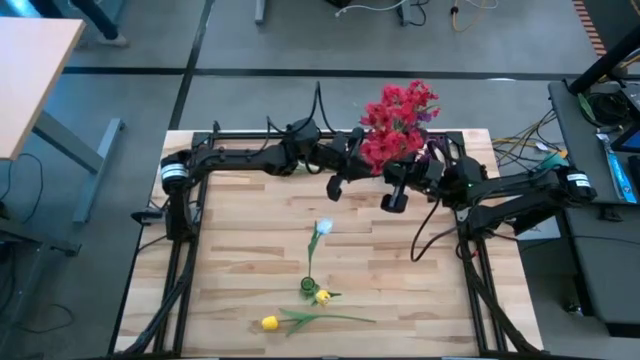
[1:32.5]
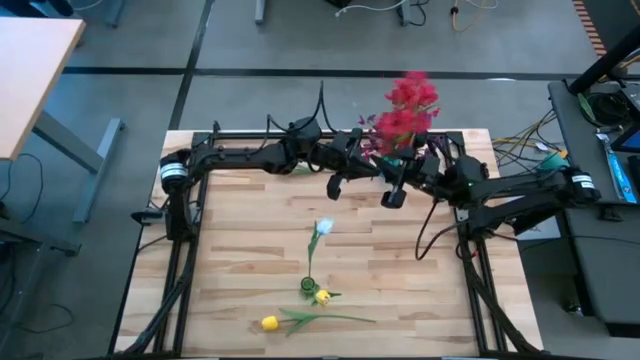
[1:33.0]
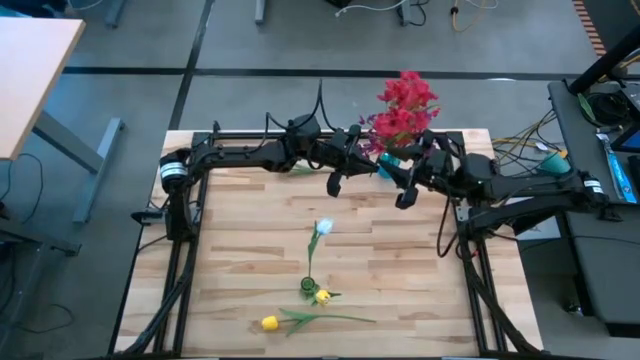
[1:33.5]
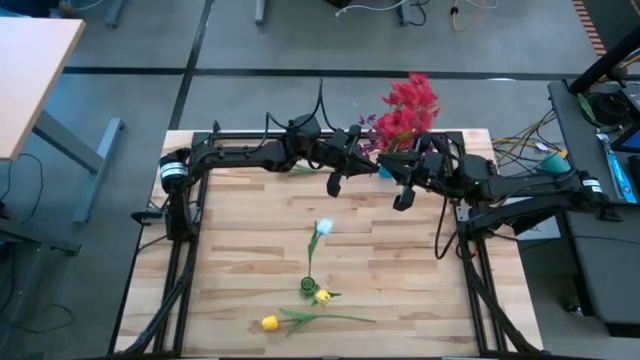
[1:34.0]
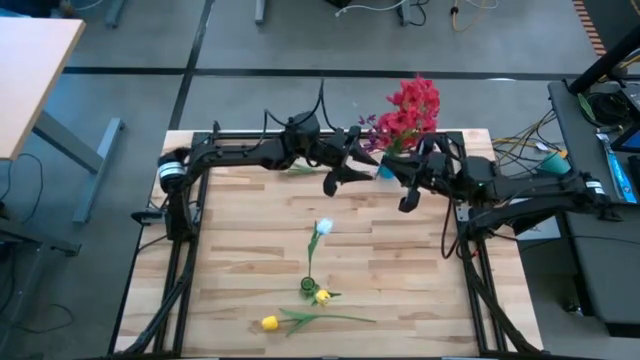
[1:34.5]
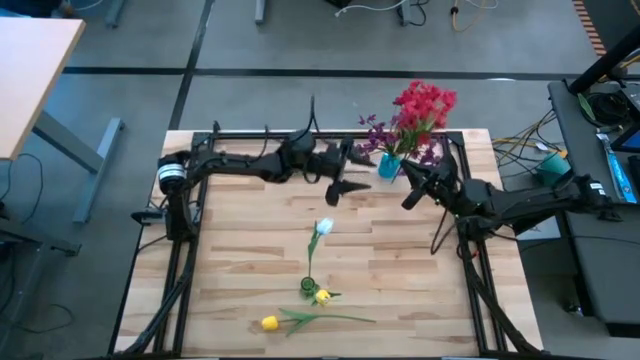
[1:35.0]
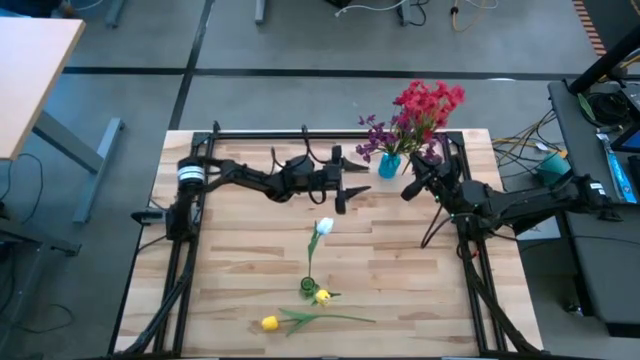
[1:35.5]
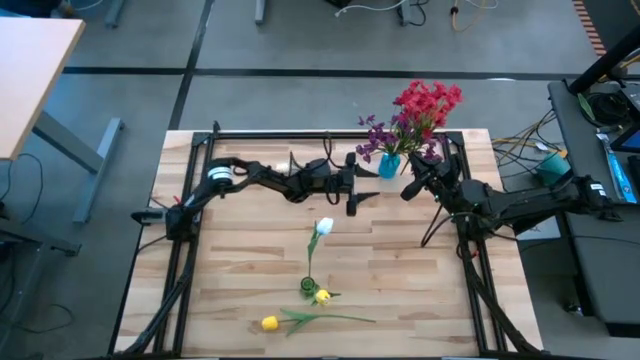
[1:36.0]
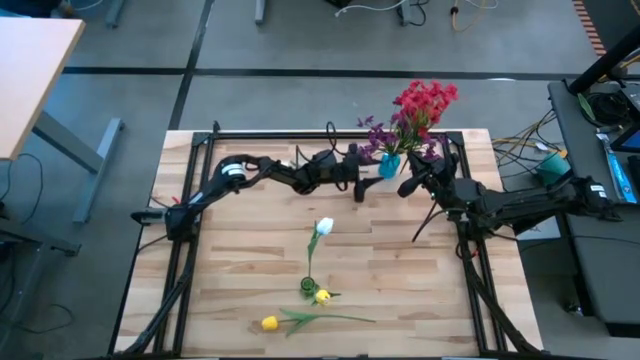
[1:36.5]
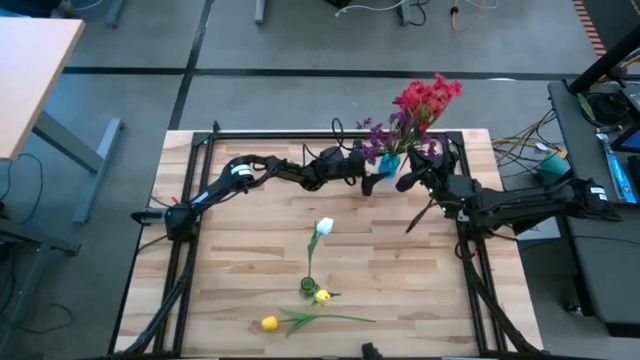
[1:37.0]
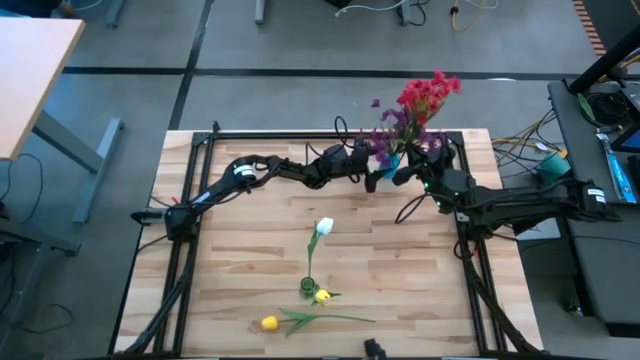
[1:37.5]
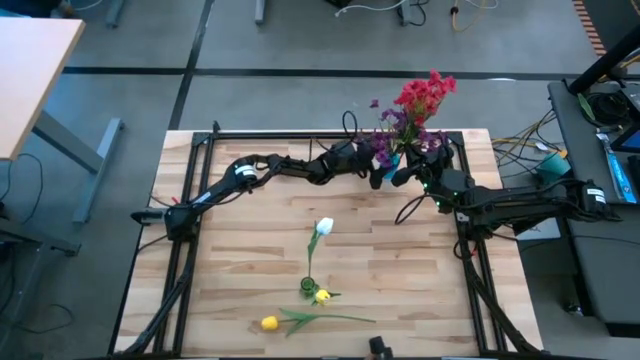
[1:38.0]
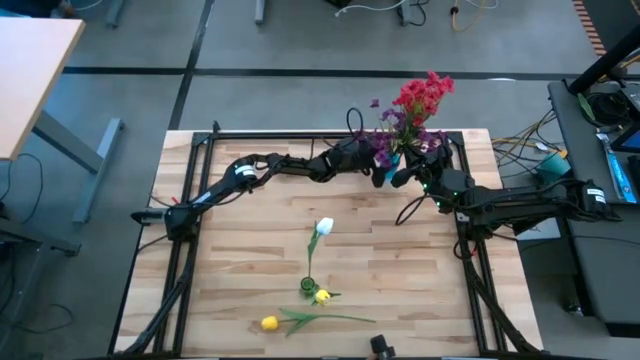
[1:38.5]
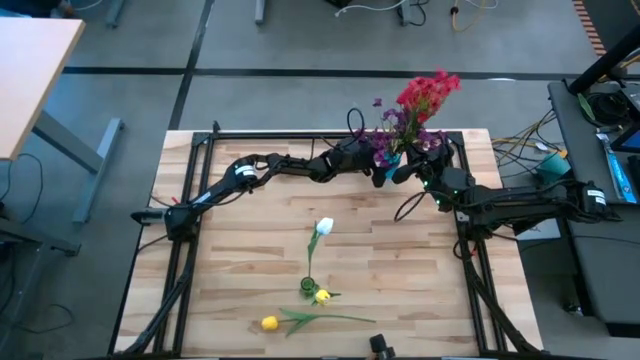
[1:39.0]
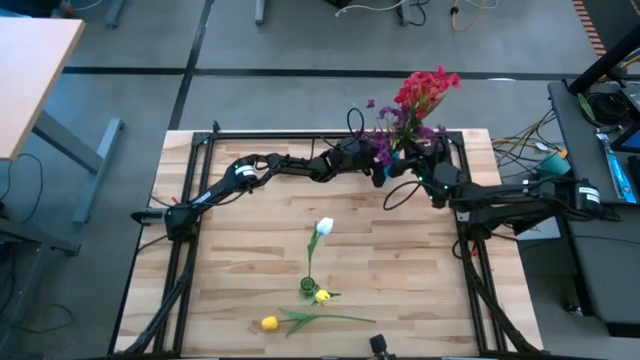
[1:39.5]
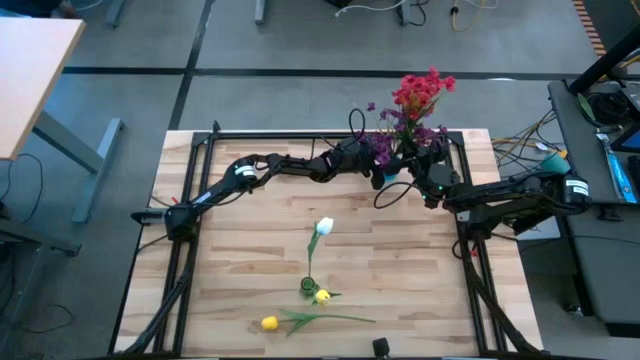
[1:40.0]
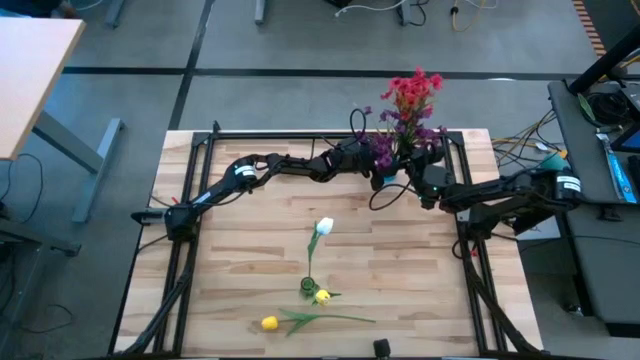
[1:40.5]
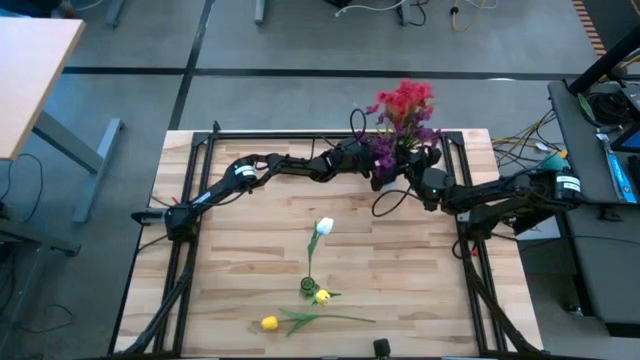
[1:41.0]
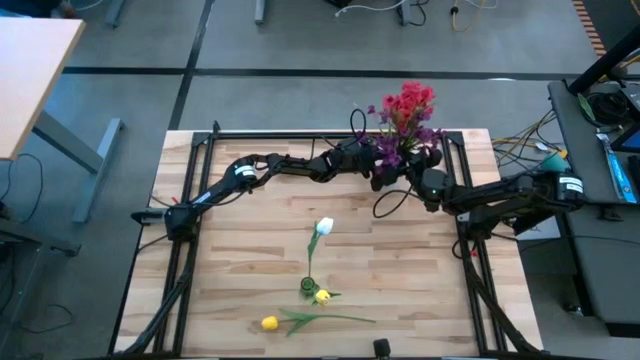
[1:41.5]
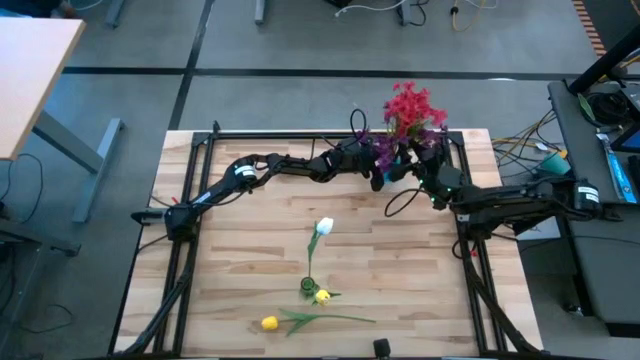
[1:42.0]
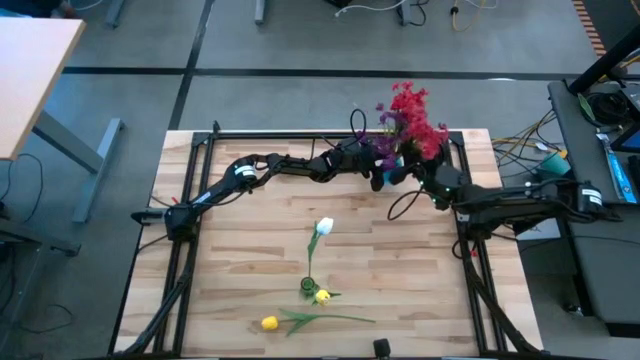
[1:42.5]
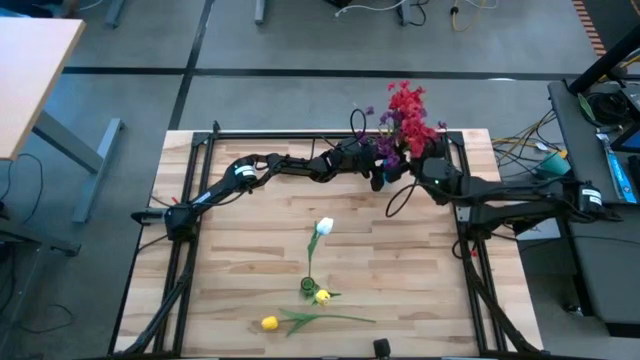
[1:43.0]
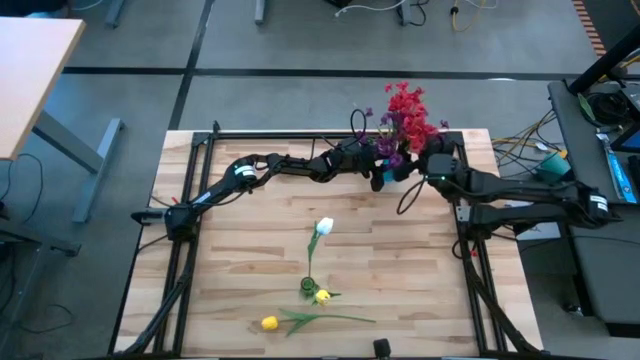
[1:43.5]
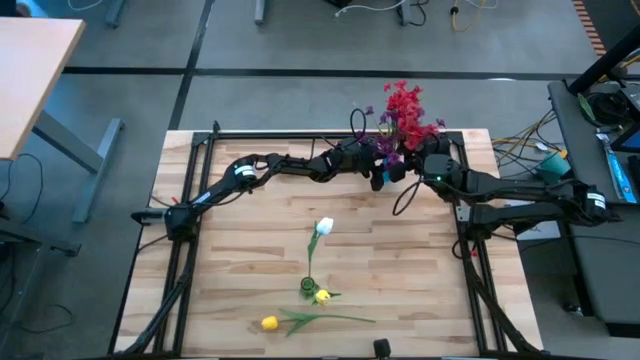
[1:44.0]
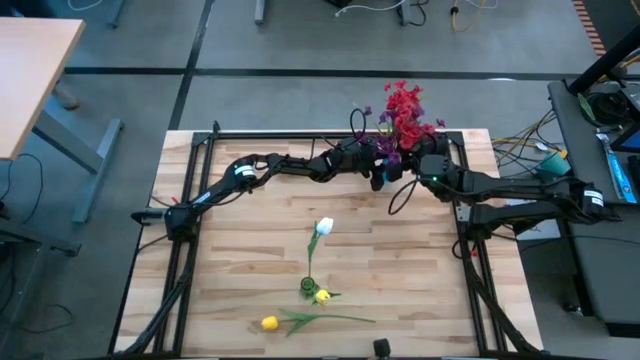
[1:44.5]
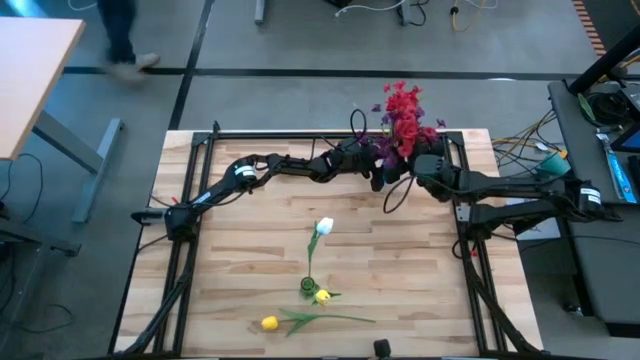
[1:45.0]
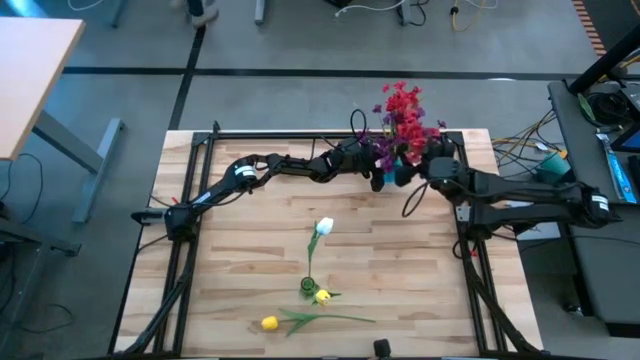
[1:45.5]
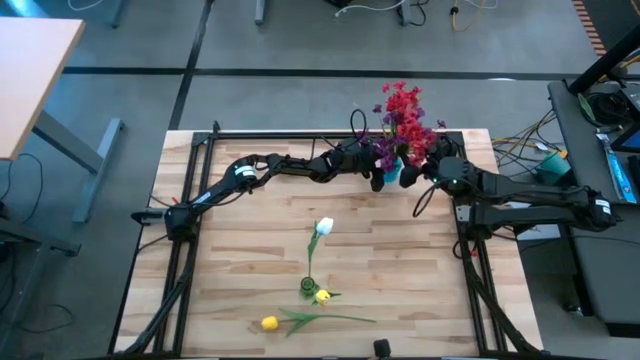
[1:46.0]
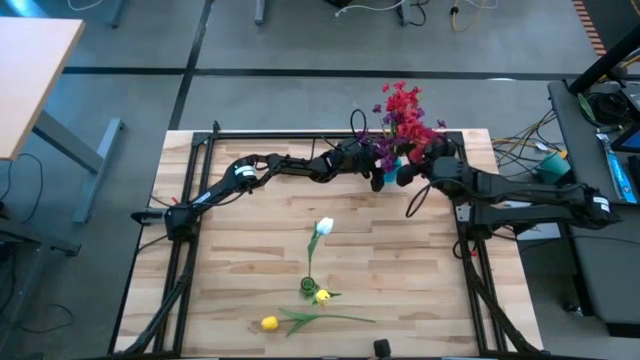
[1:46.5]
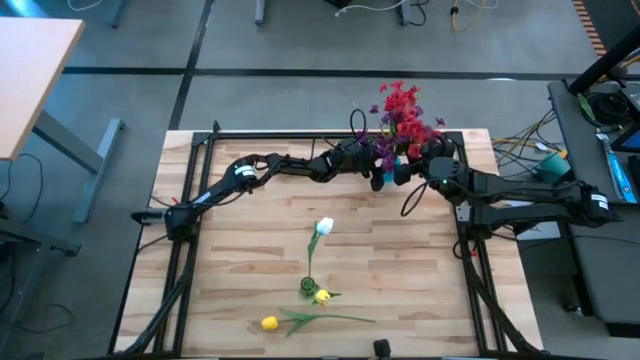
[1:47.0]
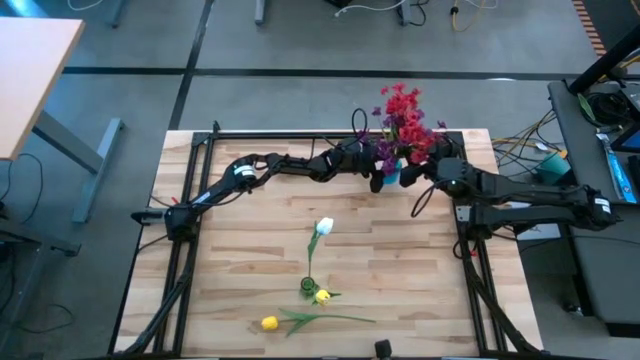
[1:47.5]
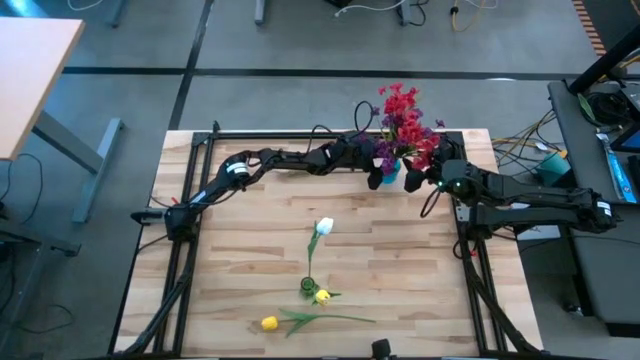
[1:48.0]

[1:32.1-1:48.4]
Task: Sort flowers into vase by color
Put the red flowers into the blue vase

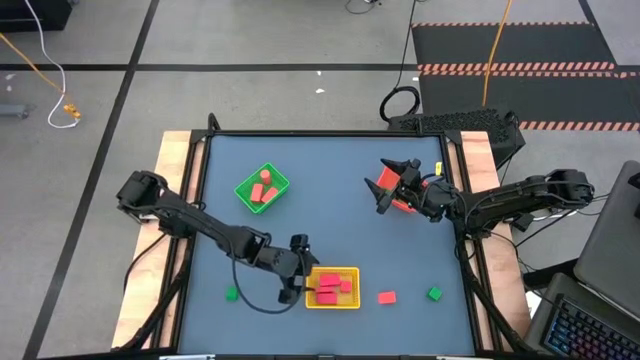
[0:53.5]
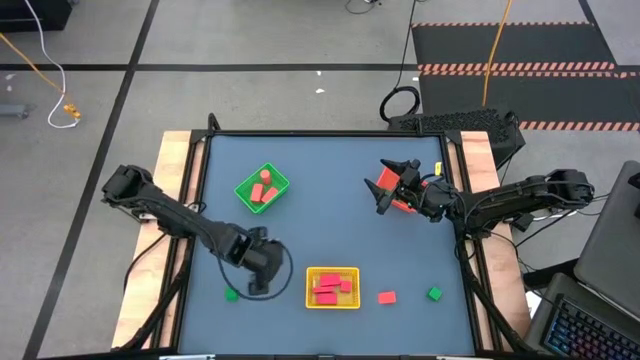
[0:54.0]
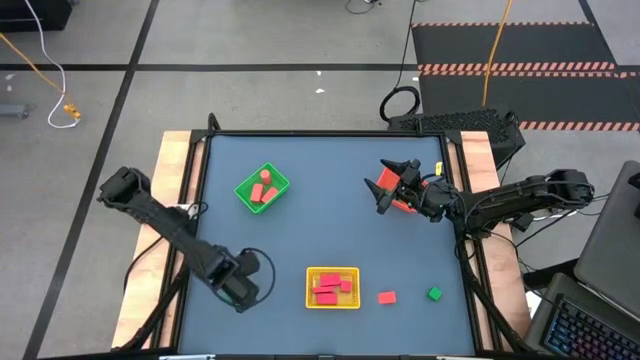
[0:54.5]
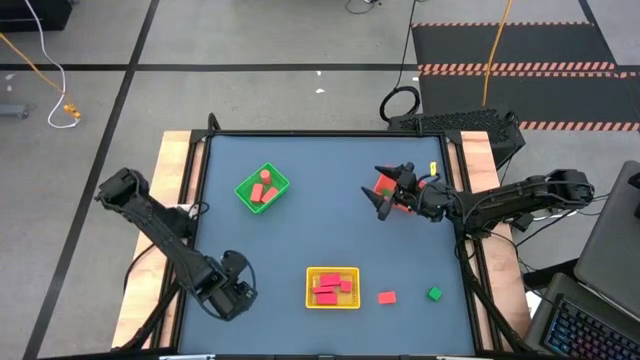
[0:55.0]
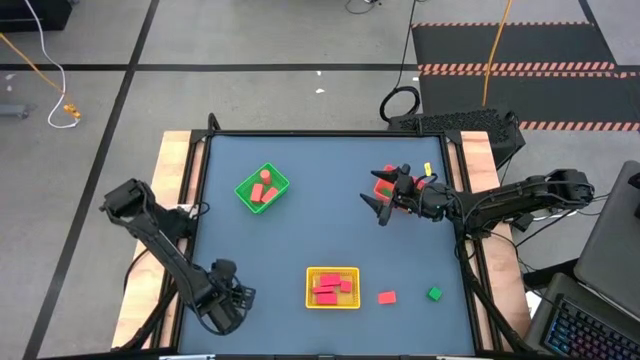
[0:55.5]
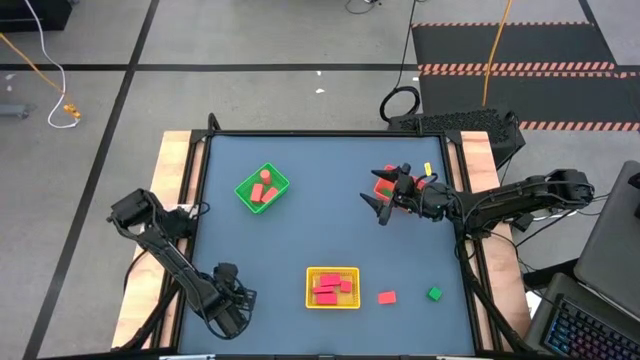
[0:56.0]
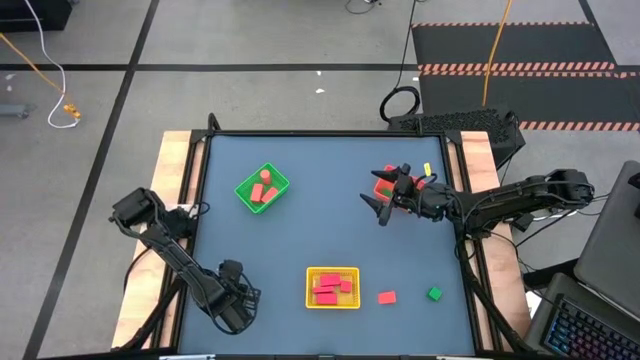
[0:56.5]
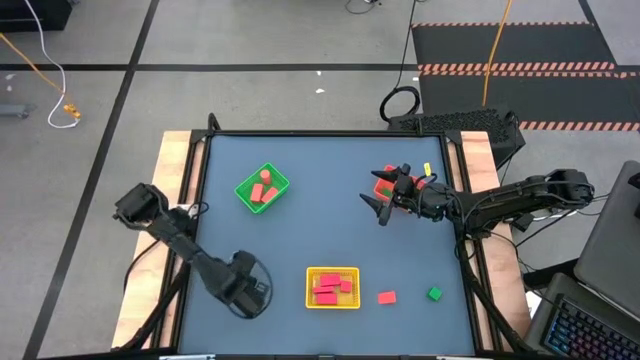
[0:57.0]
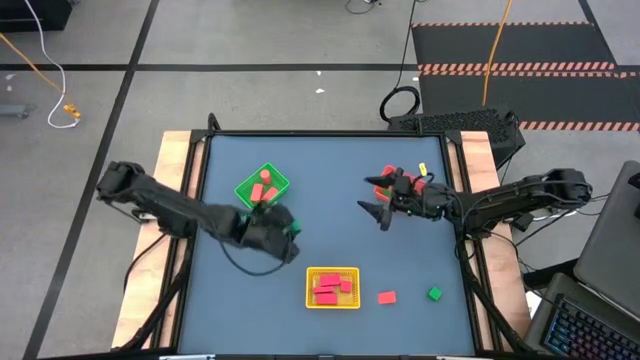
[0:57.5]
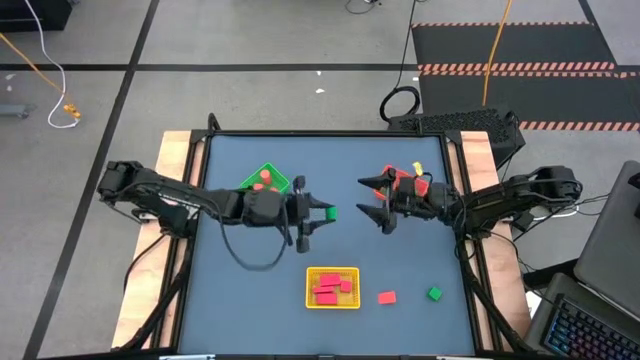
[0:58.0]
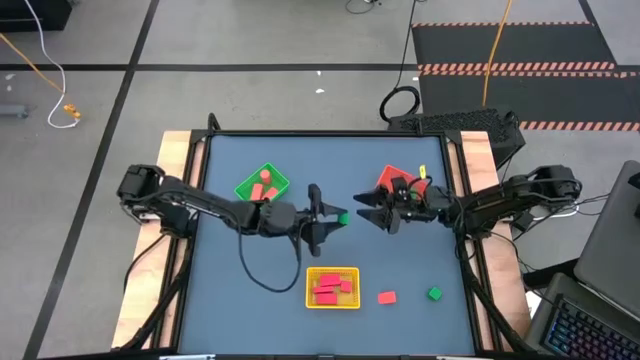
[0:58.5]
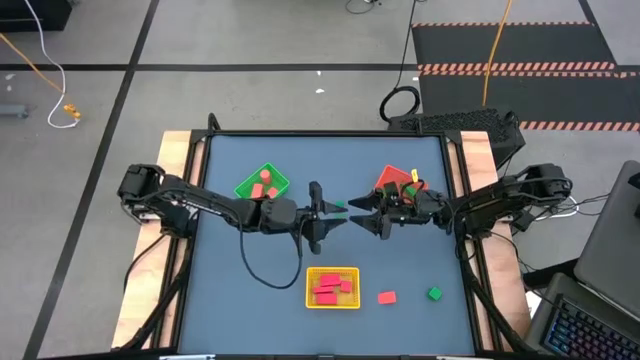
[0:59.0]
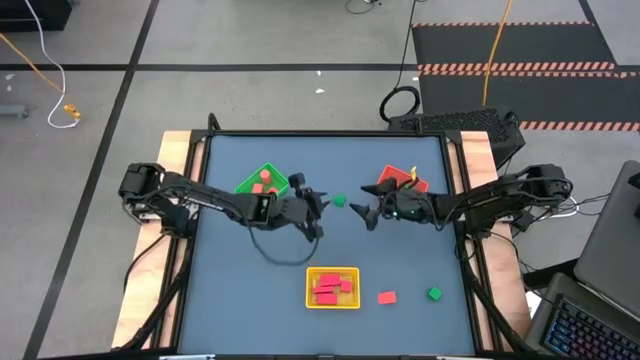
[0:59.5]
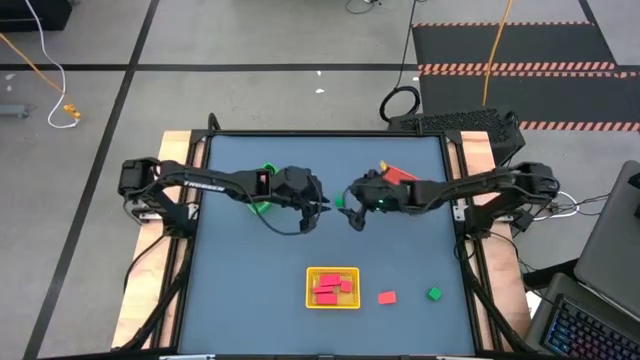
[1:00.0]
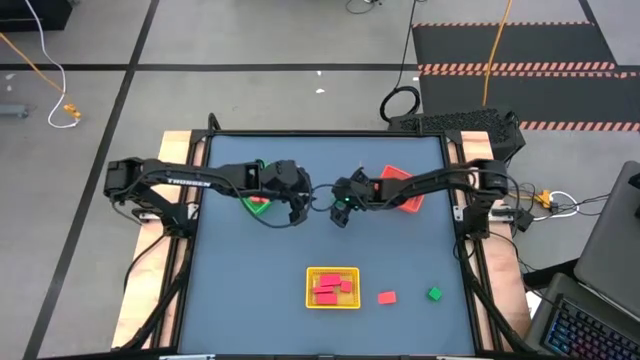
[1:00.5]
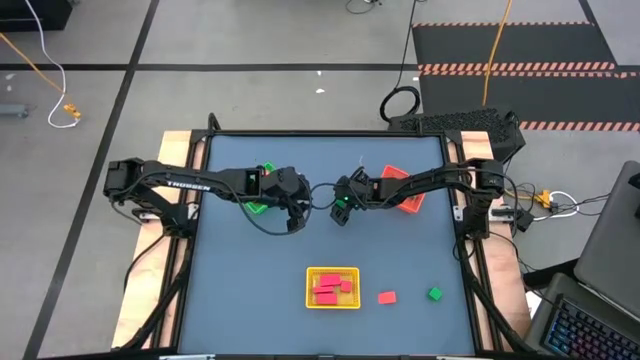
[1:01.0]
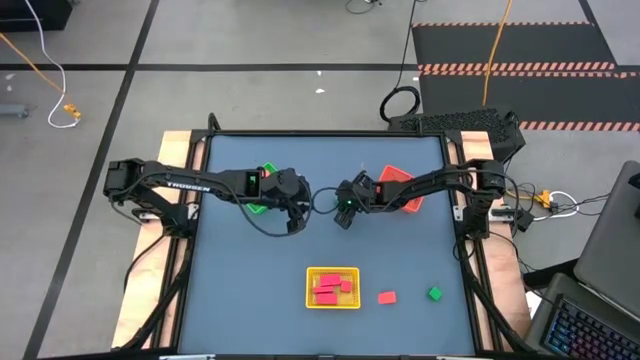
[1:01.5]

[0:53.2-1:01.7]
Task: Sort & place blocks by color
Put the green block into the orange bin
